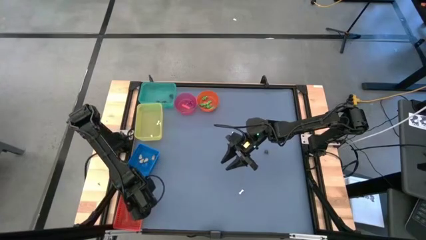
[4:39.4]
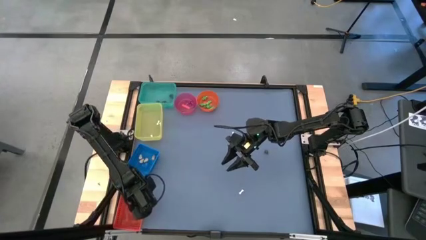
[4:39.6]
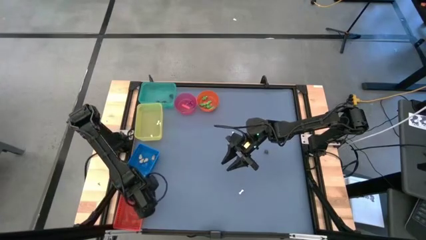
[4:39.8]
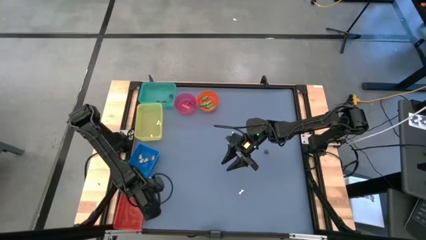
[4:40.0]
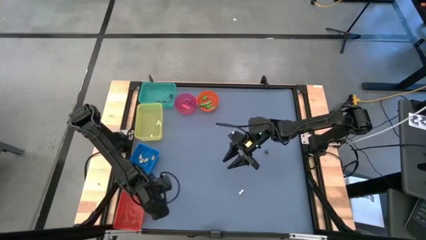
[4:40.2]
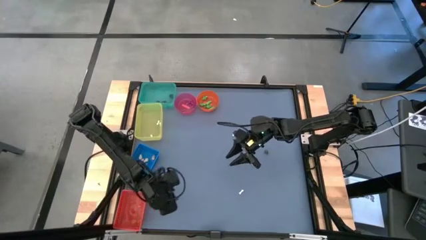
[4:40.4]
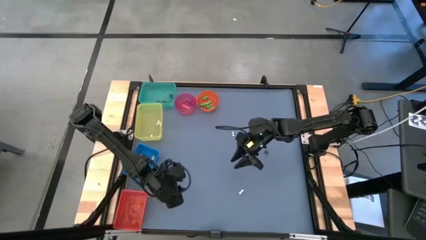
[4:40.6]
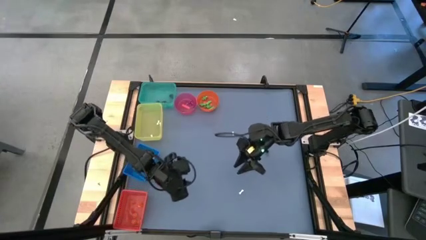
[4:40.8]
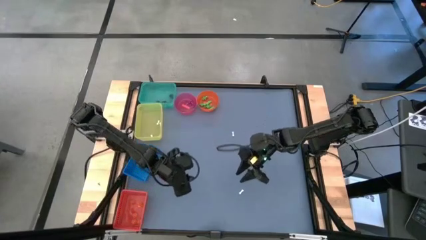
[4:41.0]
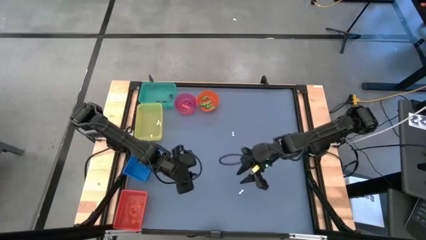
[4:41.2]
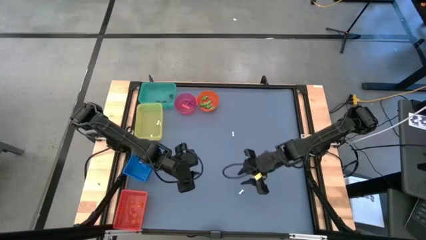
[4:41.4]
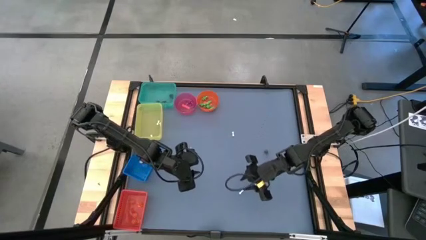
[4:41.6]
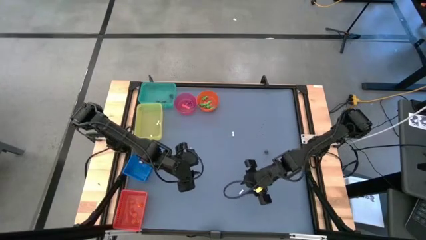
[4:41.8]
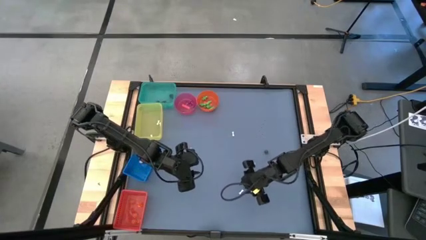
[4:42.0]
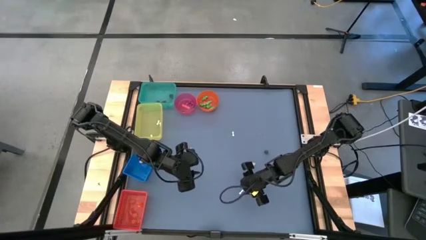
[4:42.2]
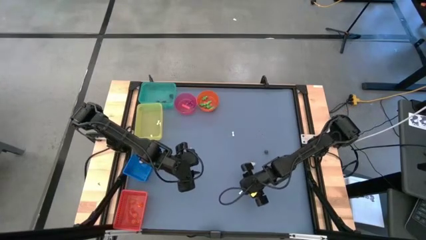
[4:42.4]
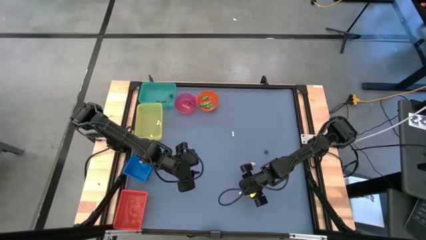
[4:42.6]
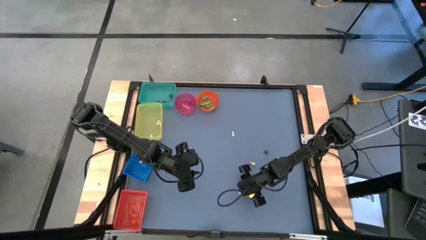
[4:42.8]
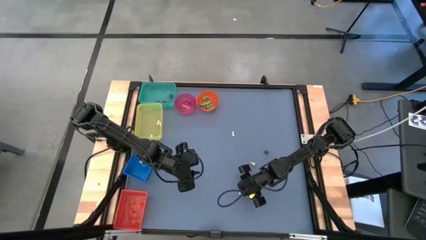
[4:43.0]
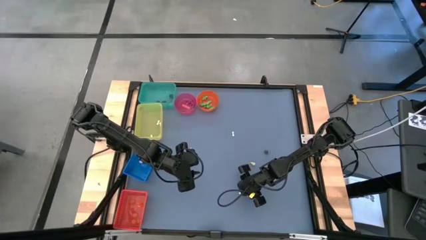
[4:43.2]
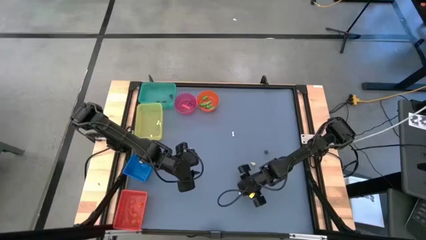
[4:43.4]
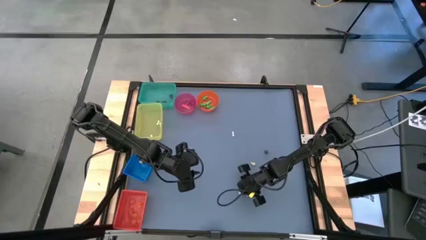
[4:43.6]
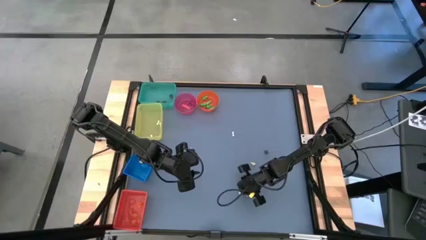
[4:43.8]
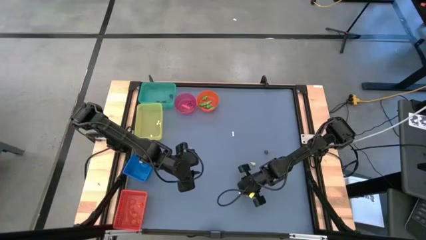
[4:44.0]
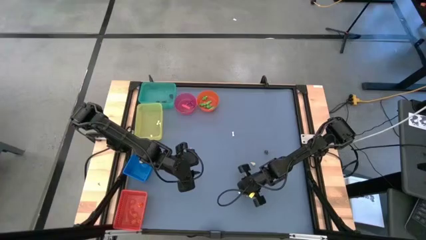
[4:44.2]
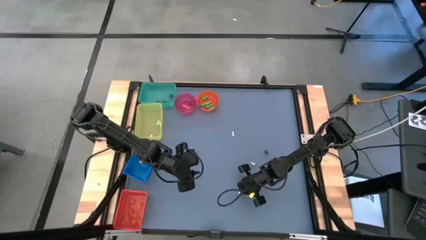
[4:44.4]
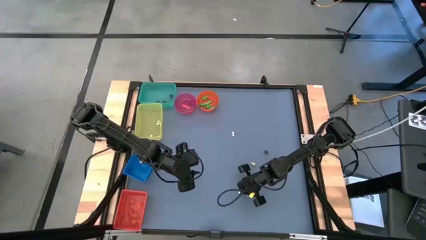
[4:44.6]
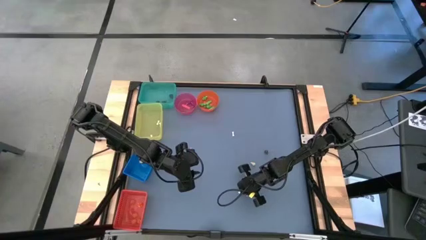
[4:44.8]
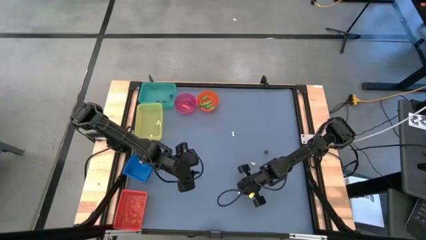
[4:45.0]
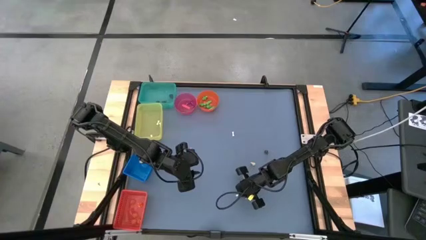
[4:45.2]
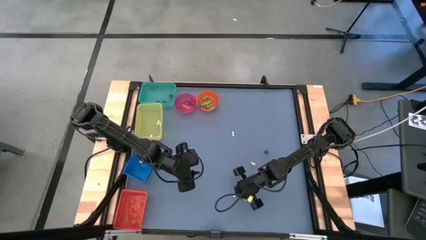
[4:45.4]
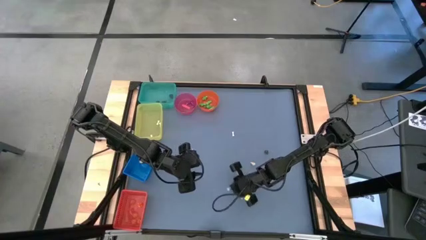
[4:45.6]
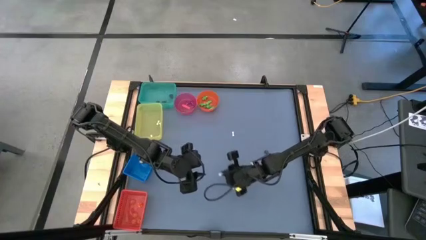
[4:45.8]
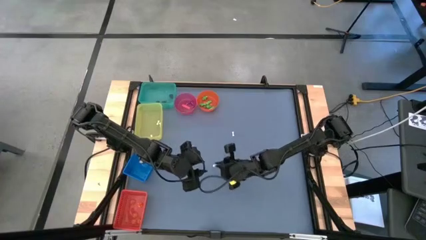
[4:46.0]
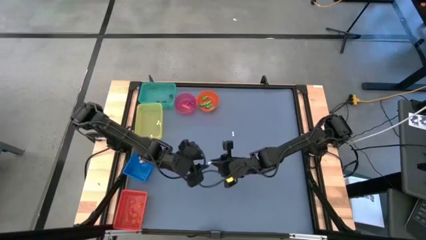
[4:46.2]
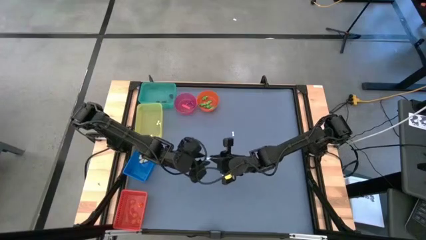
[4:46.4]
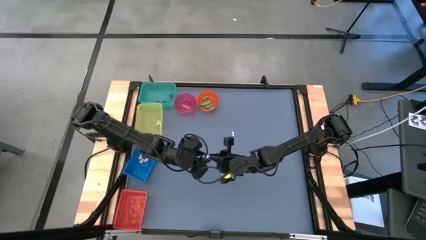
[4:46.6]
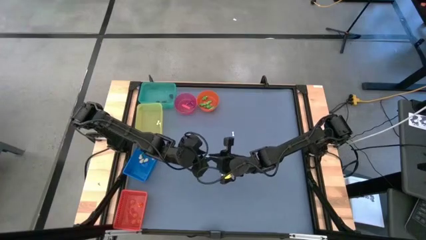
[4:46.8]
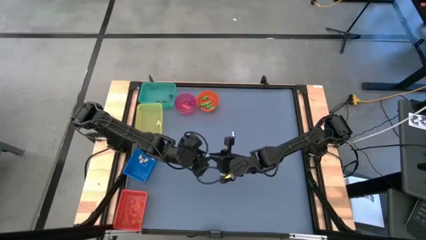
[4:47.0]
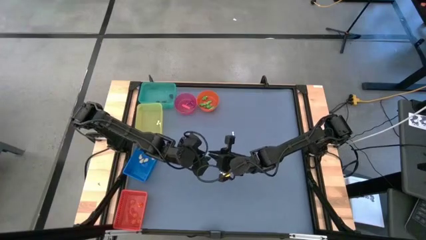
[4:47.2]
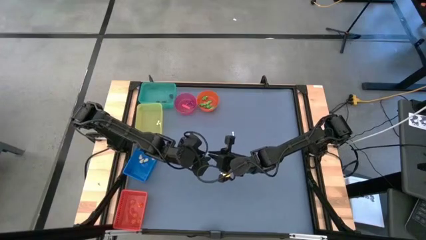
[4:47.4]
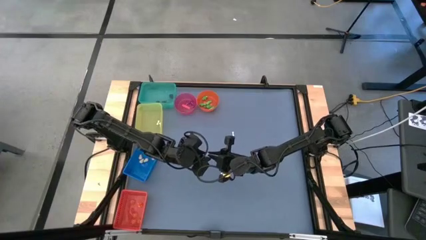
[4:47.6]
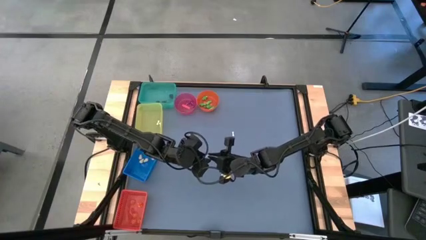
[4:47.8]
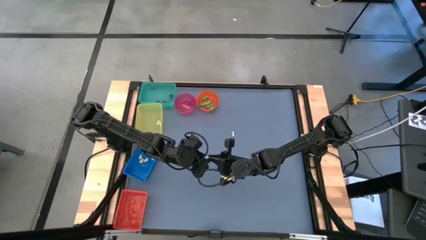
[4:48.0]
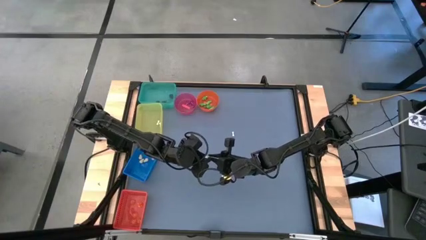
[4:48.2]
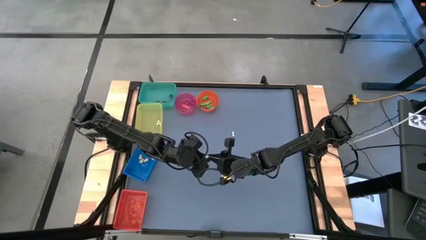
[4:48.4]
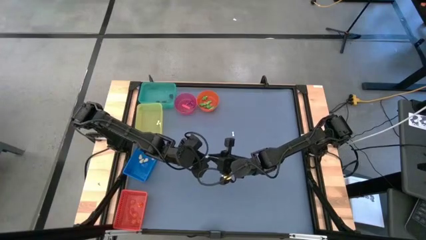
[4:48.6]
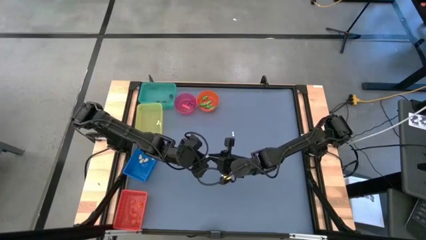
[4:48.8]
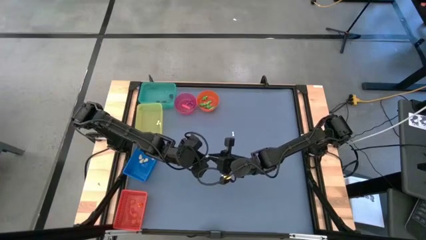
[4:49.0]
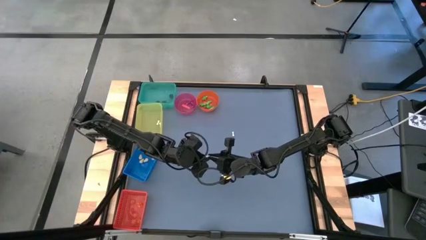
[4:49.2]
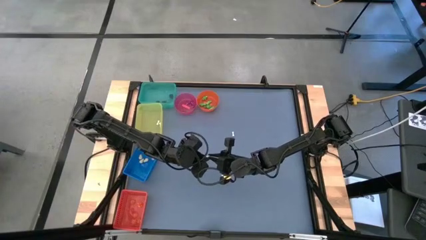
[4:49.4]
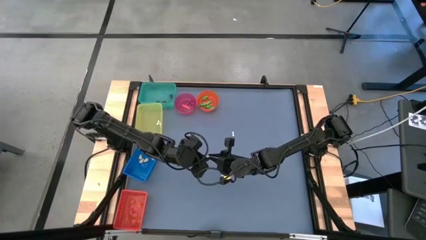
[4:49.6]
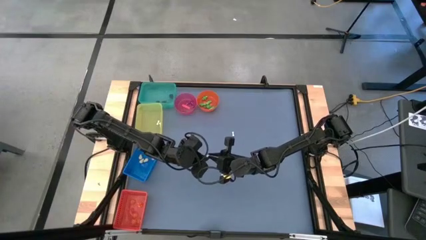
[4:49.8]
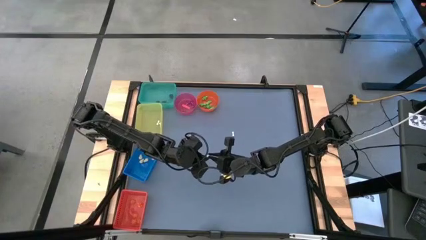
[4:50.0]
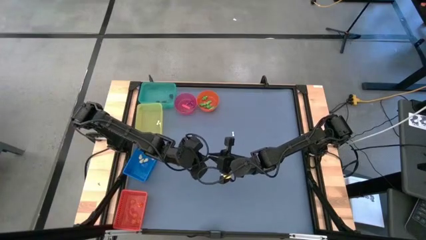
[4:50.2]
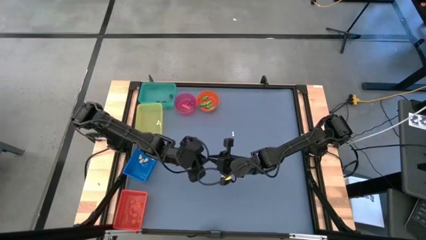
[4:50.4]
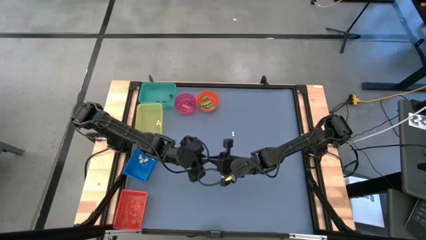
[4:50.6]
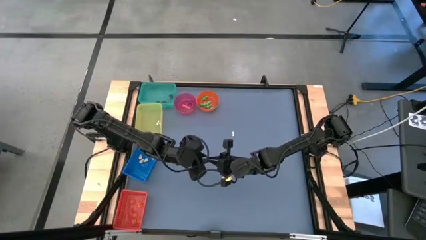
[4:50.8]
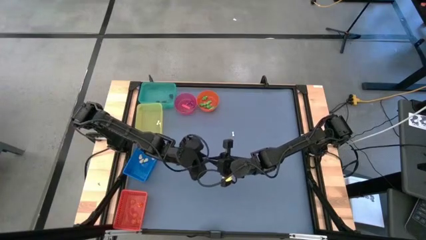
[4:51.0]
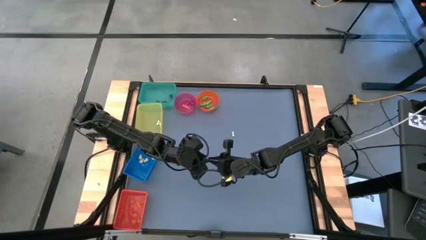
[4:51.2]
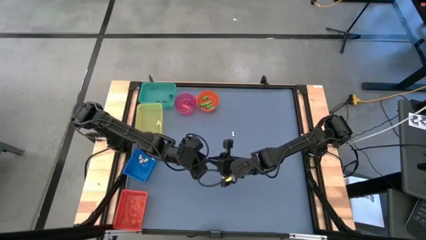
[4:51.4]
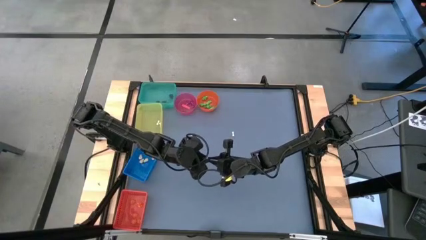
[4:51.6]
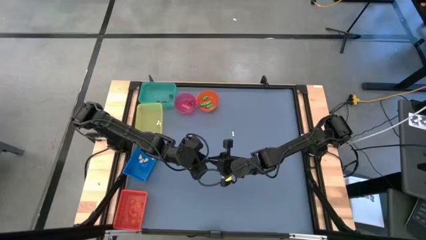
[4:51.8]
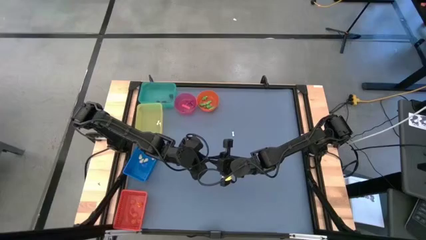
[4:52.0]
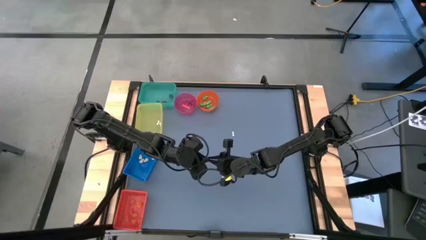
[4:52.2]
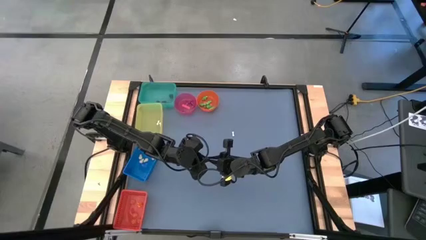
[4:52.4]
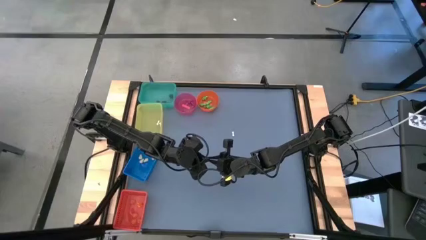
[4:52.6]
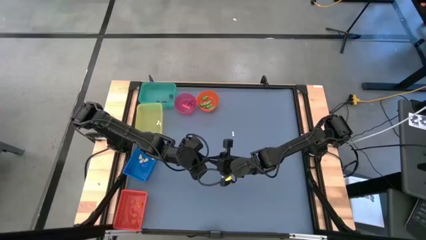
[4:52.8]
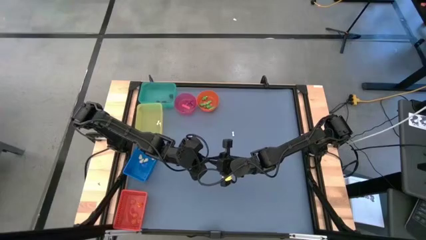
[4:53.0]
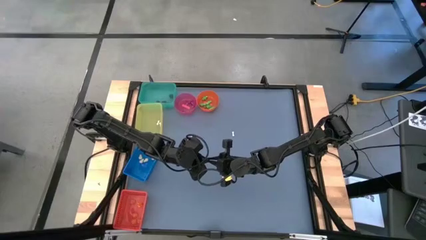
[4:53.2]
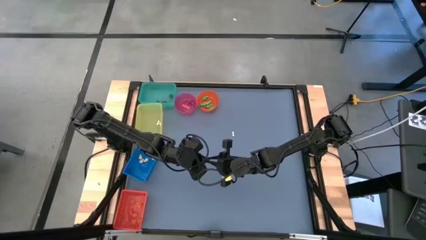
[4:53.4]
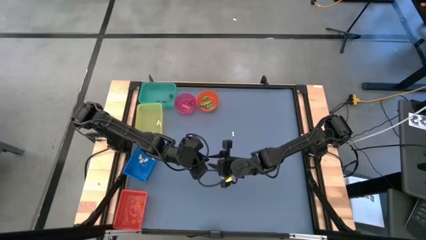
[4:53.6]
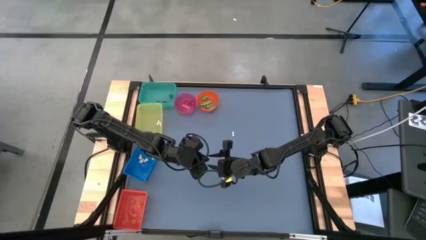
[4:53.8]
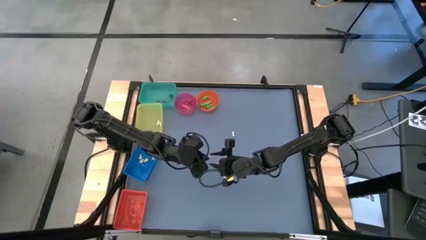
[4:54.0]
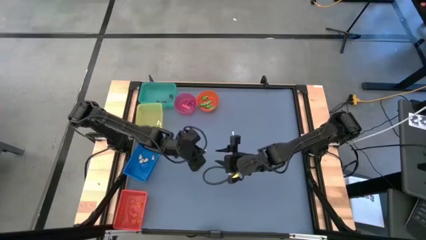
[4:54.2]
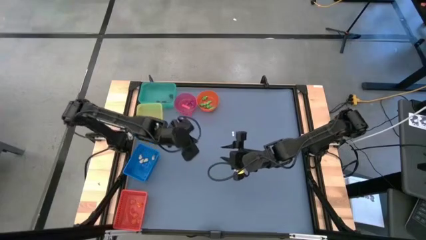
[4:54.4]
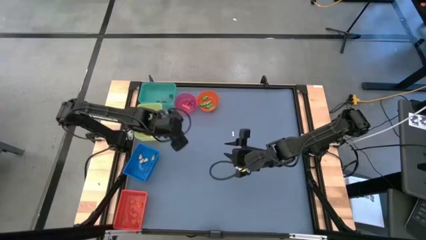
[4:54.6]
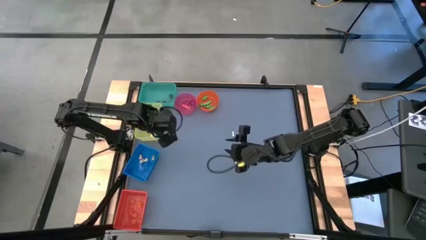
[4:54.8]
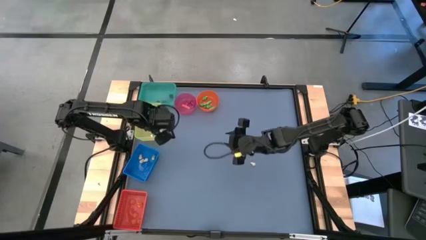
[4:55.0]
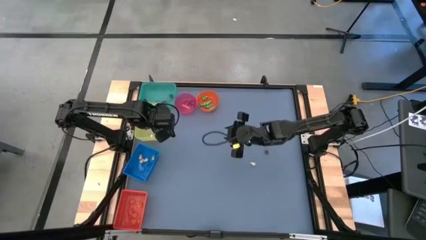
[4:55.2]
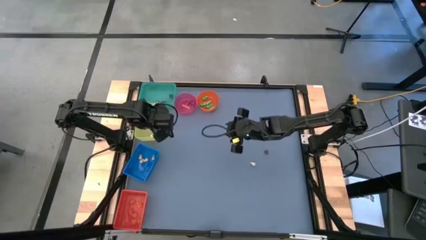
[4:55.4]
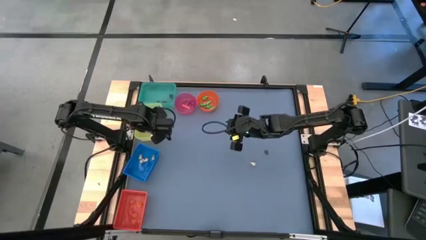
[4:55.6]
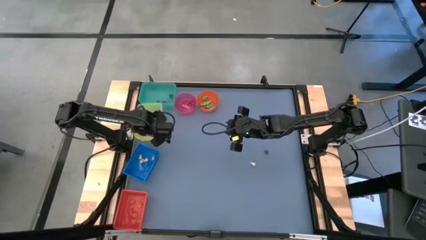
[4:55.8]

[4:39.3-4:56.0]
Task: Sort Halloween decoration
Put the white bone toy into the yellow bin
